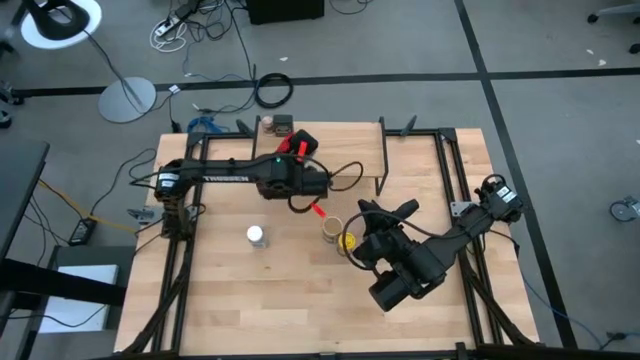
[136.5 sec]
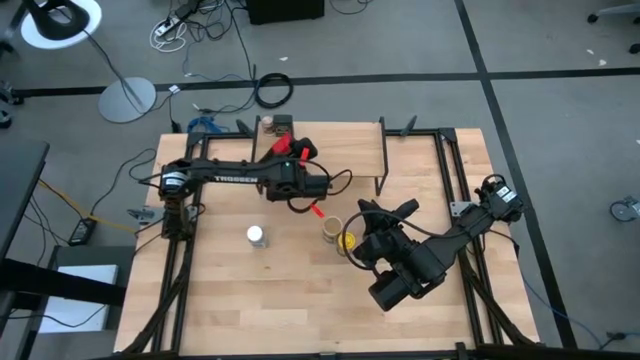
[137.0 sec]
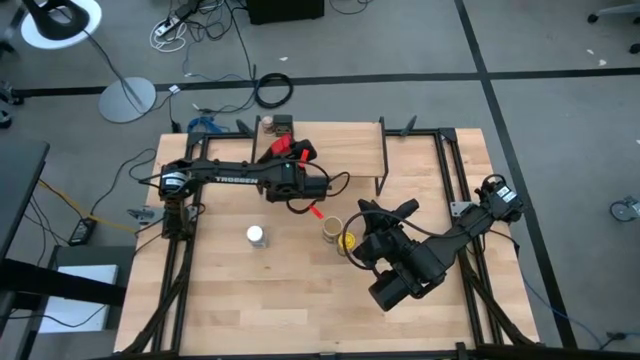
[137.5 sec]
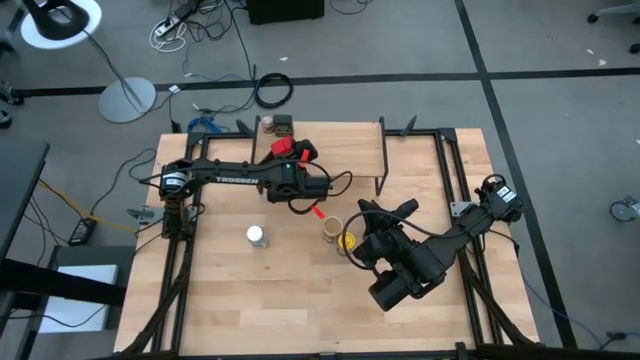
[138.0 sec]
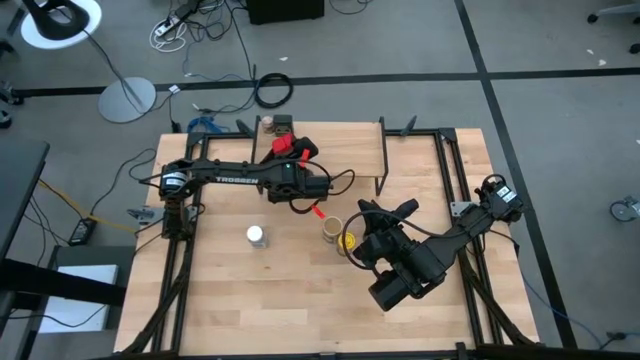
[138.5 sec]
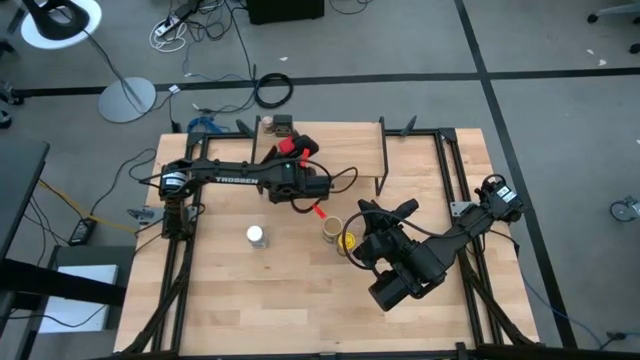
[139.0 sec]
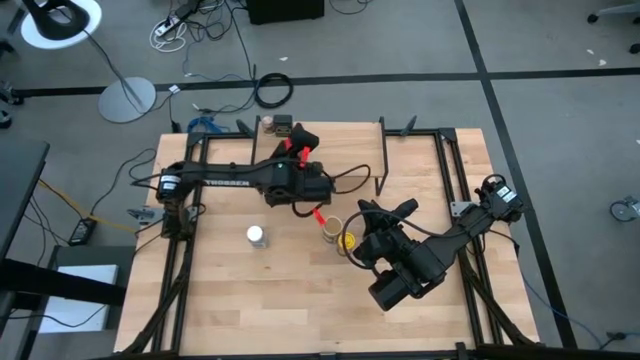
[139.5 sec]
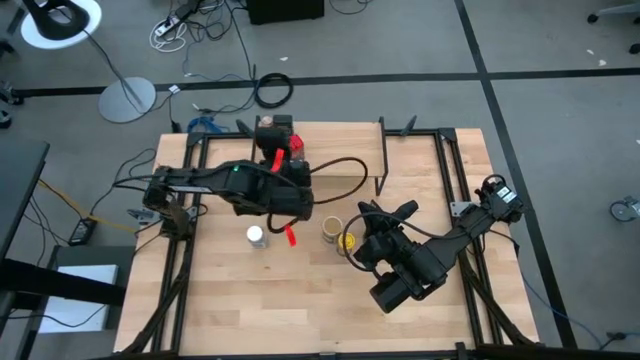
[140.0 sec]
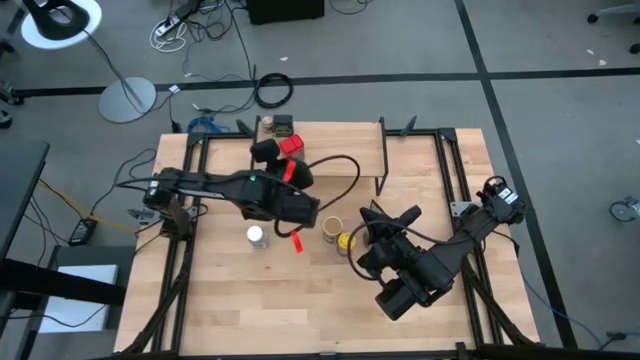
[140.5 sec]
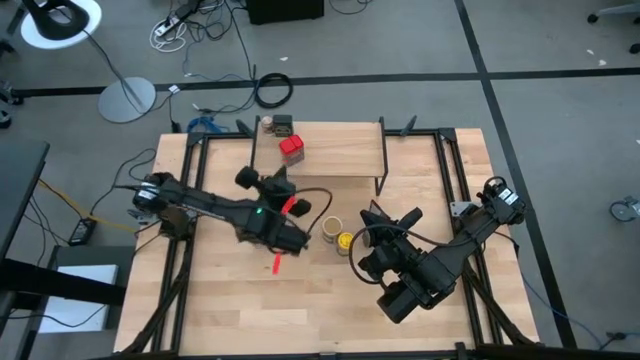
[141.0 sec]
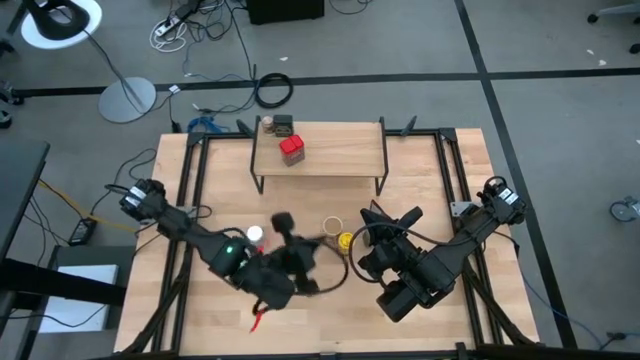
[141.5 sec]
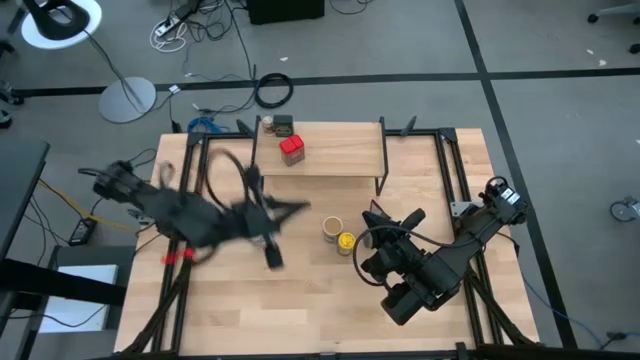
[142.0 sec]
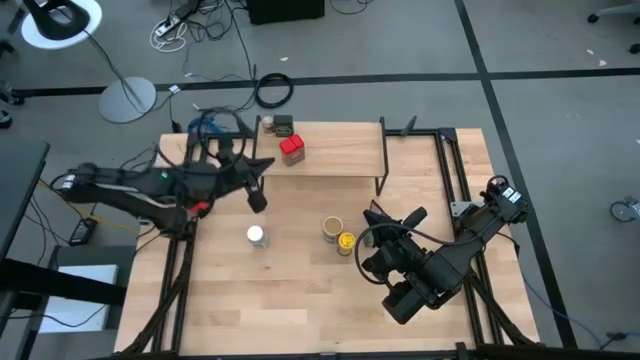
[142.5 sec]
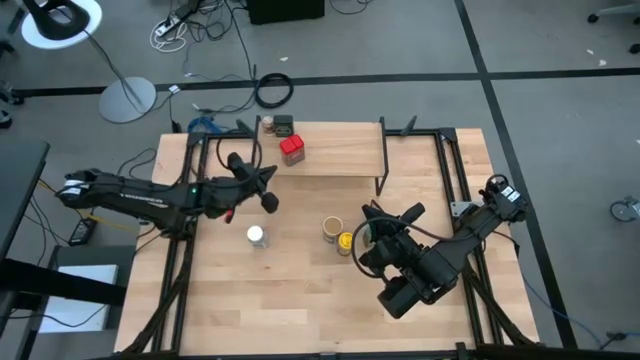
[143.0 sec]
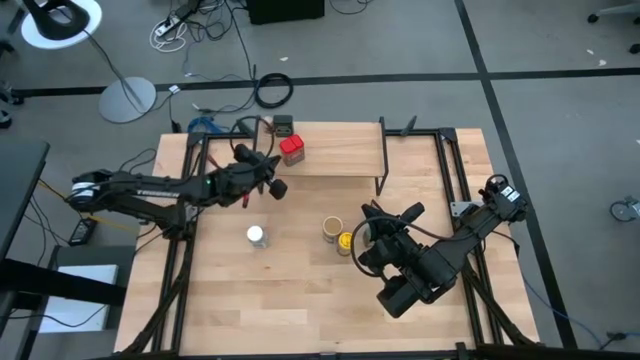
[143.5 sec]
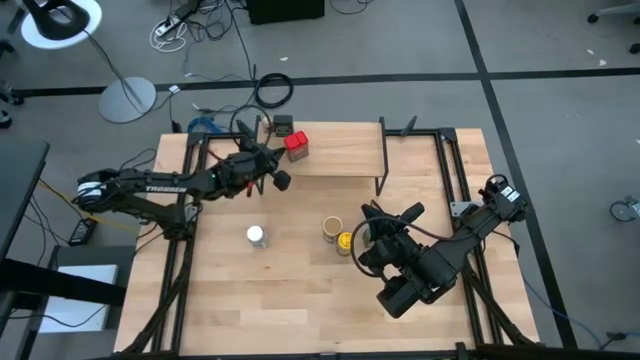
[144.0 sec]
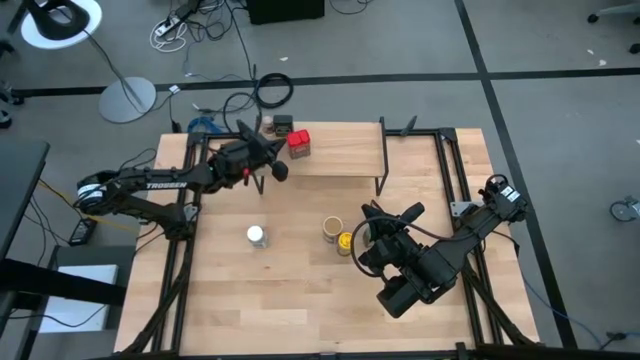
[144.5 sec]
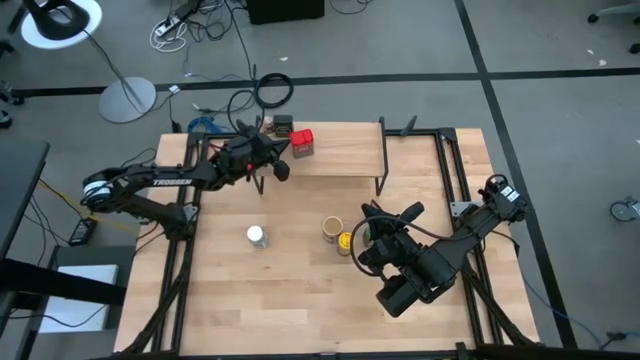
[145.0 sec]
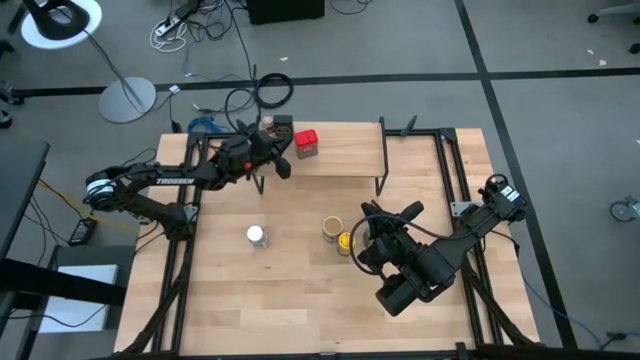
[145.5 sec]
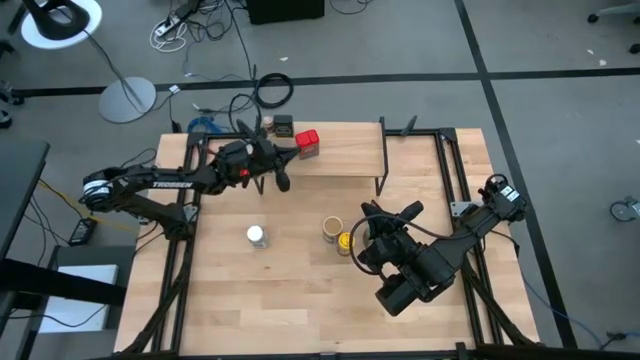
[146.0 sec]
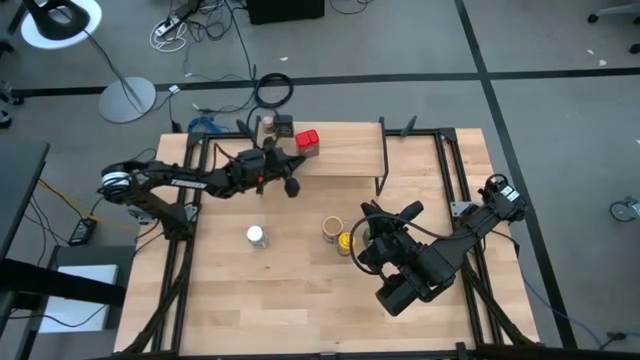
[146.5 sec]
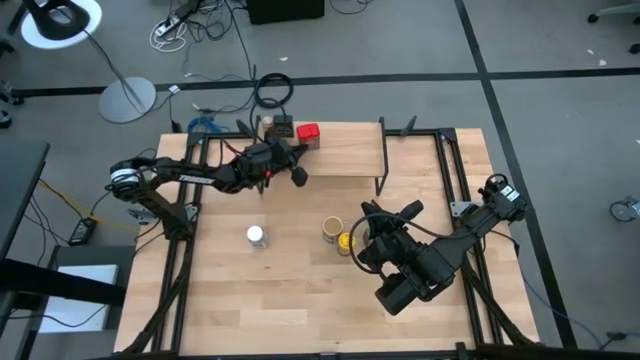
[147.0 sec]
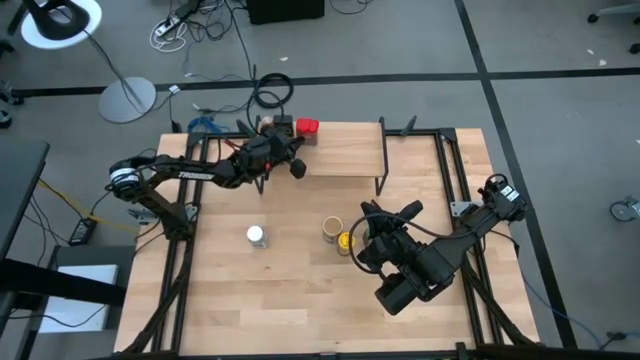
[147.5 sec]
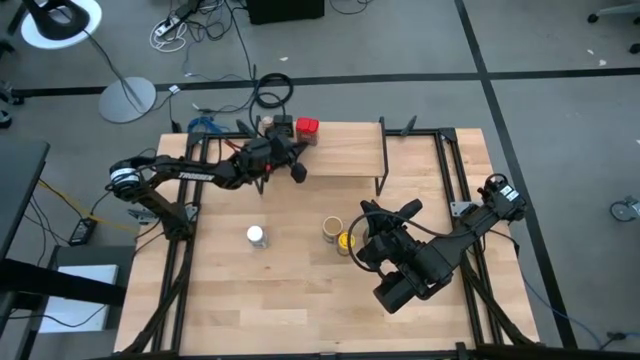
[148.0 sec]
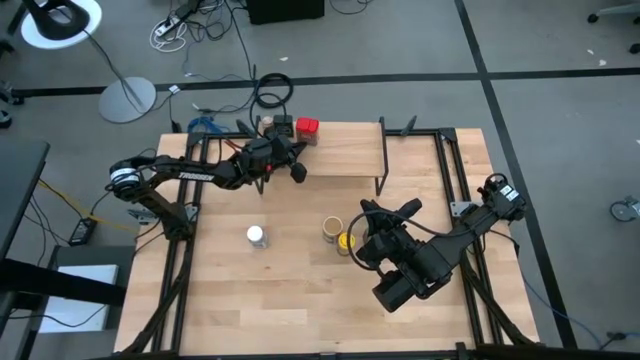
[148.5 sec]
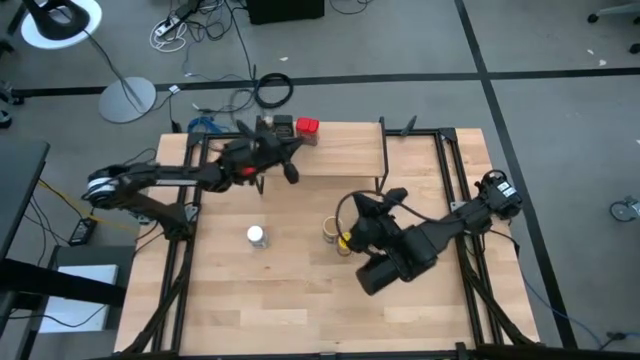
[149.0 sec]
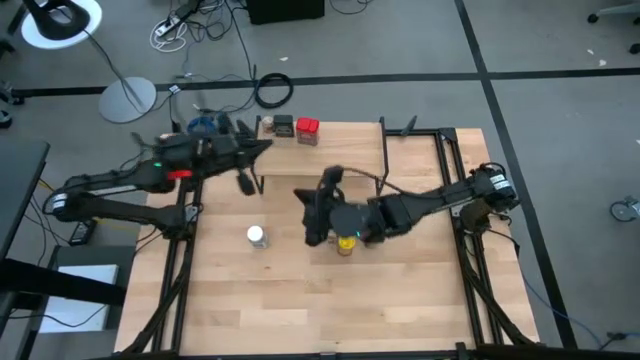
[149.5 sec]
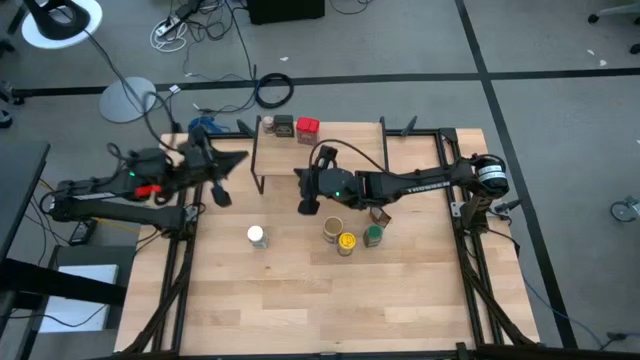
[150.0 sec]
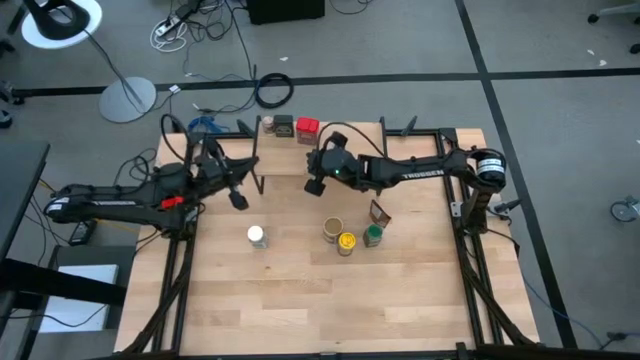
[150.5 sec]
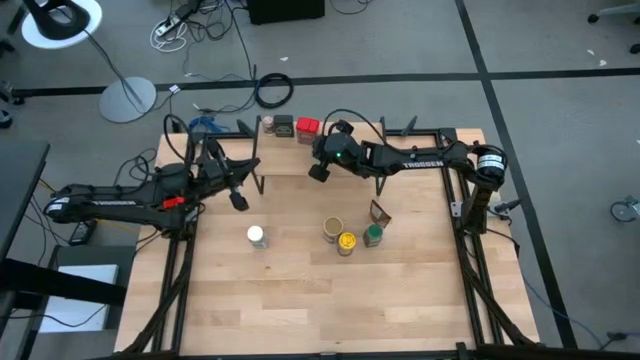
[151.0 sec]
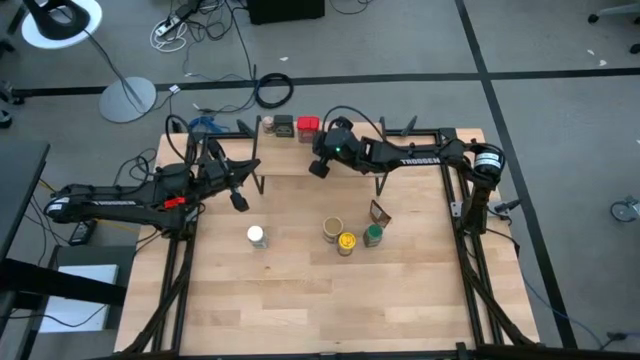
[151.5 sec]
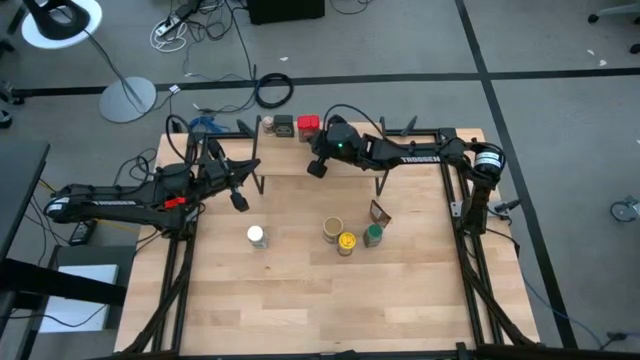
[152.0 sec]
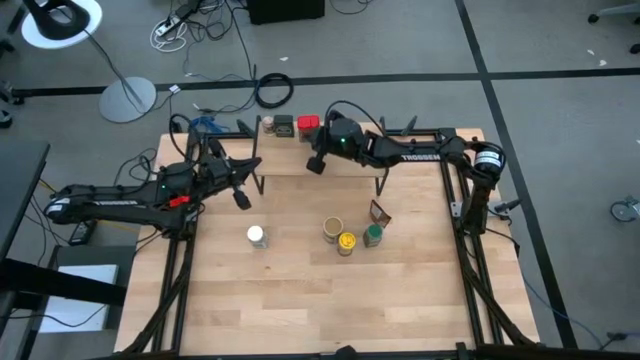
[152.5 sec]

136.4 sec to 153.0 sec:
Task: Shelf spices
Put the red seasoning can on the shelf

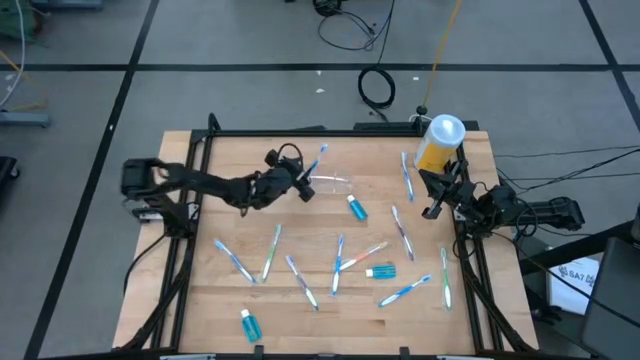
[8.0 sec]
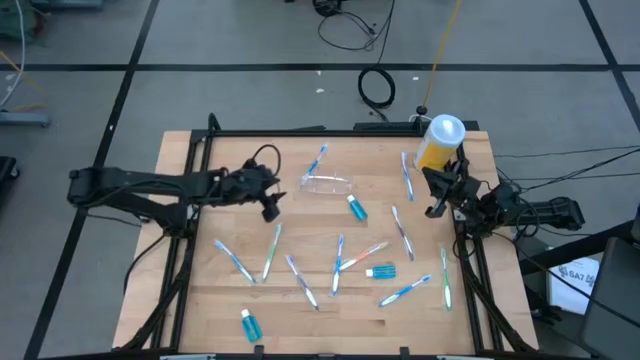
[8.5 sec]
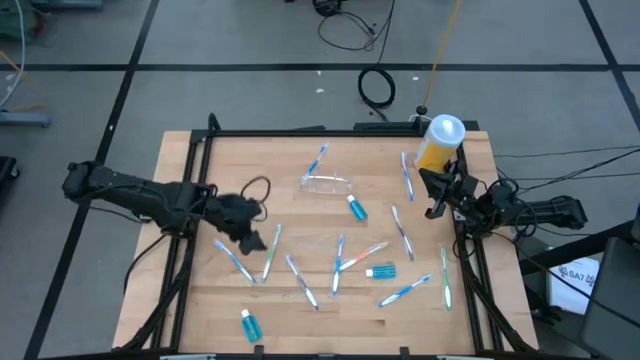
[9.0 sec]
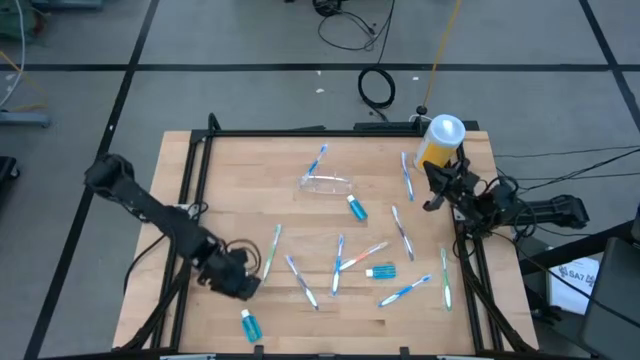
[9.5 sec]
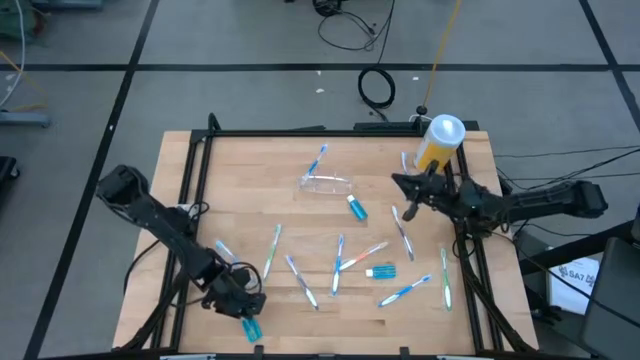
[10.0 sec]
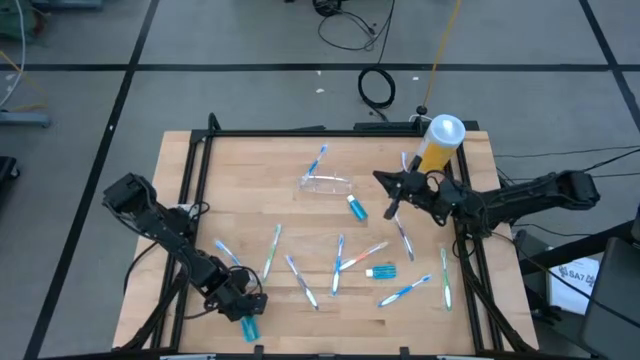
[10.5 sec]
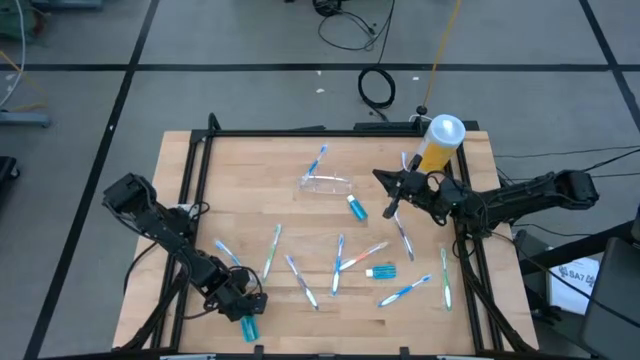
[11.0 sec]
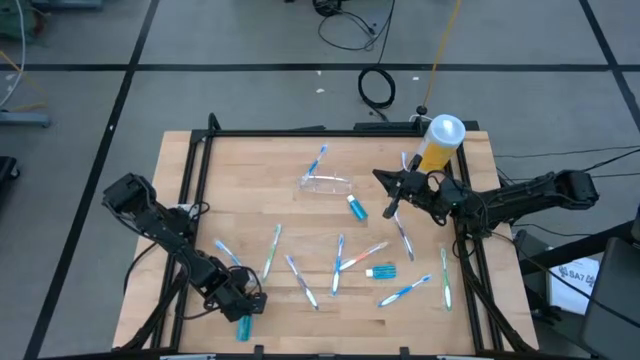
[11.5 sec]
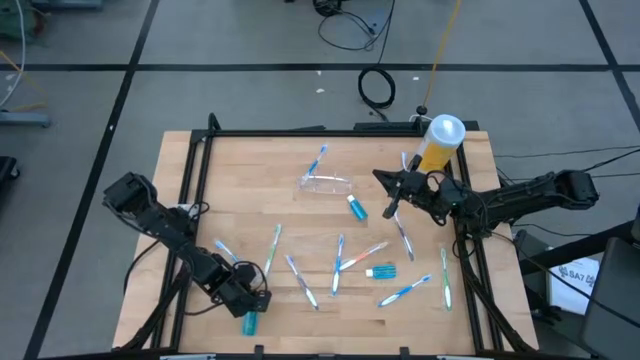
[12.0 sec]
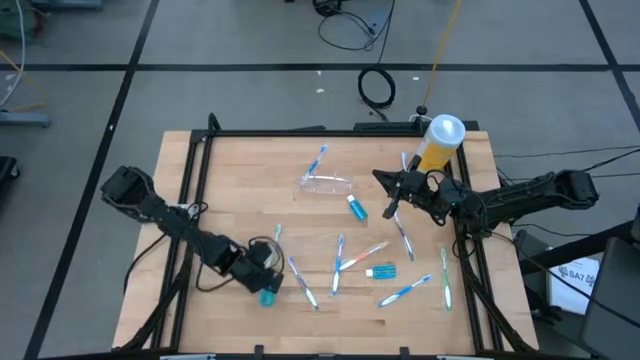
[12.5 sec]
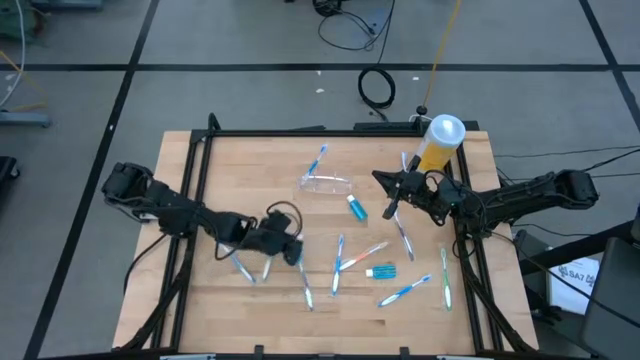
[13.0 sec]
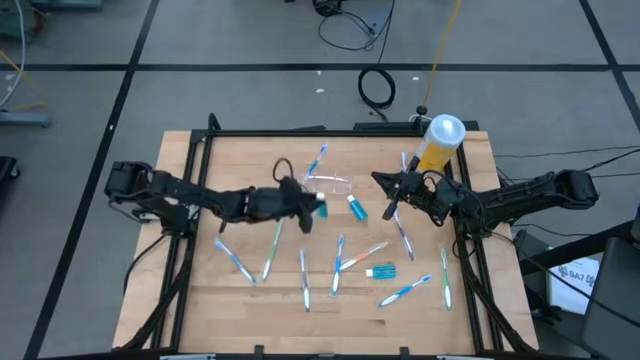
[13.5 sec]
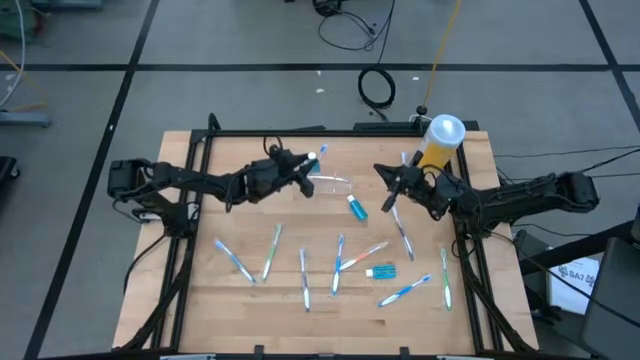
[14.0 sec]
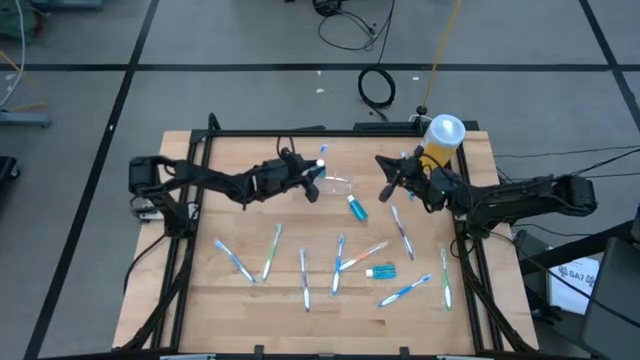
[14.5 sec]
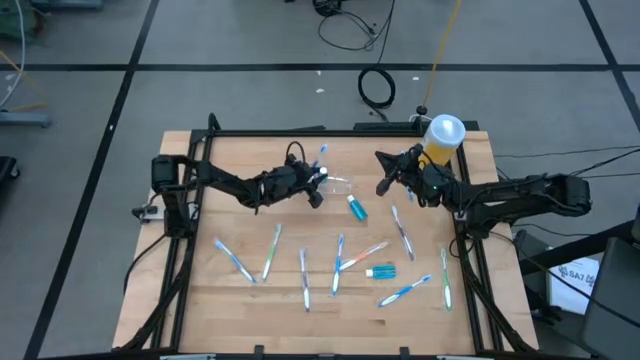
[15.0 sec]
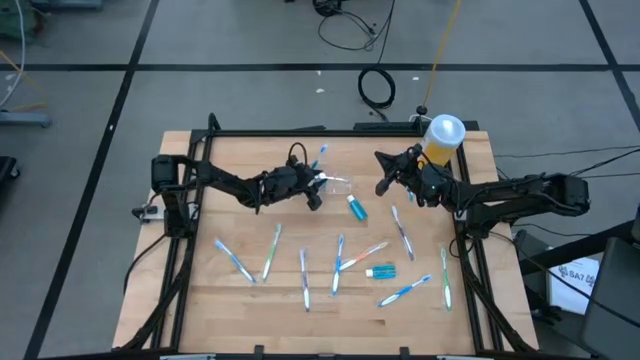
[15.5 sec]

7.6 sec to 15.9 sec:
Task: Pick & Place toothbrushing station
Put the mouthwash into the transparent organizer
